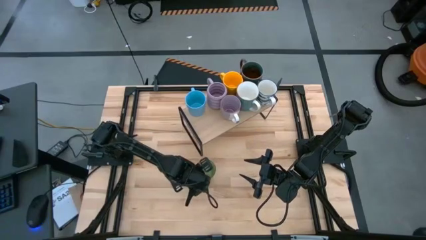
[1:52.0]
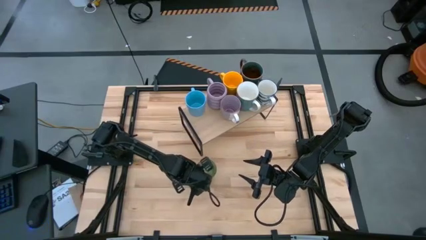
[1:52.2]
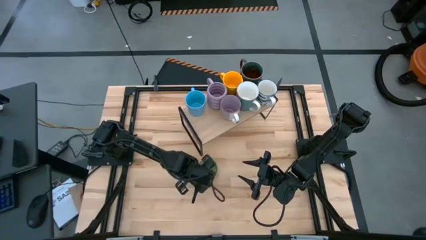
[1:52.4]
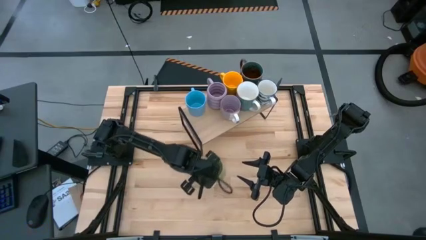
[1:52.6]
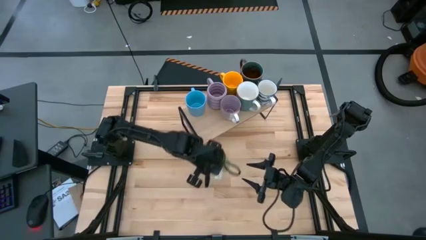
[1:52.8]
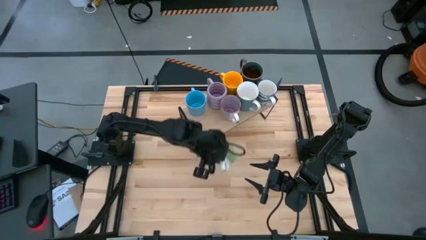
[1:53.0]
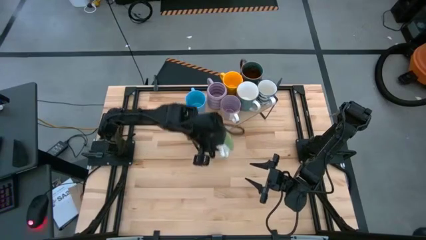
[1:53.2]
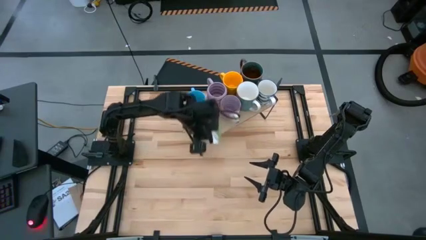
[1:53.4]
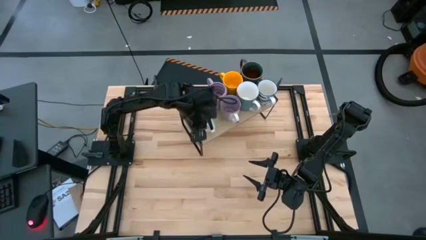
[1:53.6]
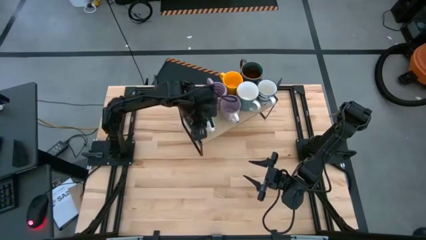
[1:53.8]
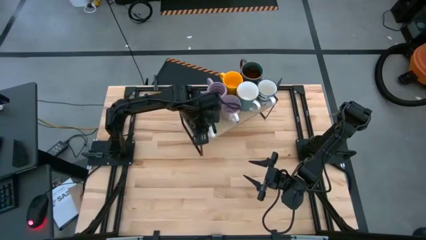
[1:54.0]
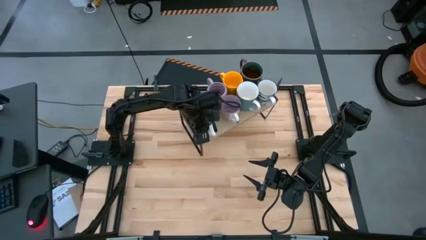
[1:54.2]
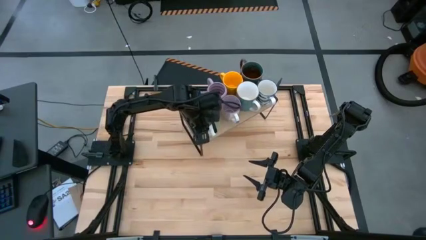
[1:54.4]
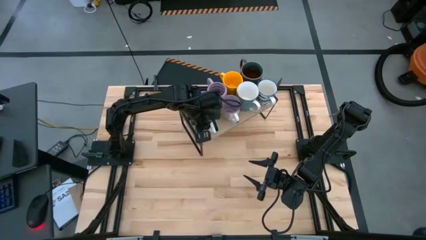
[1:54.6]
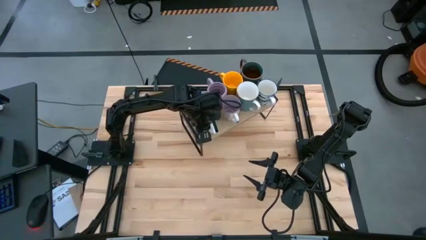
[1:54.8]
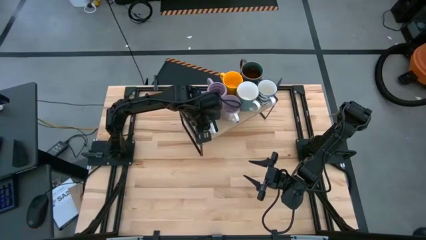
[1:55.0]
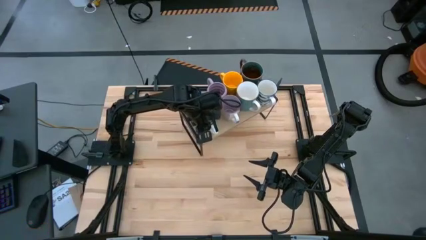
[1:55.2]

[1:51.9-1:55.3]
Task: Place coffee mugs
Put the green mug on the shelf

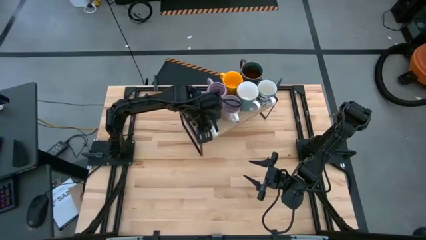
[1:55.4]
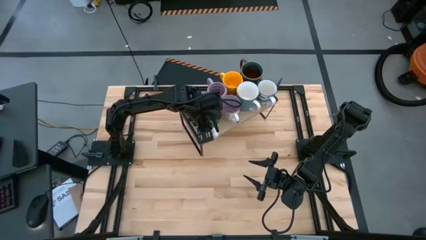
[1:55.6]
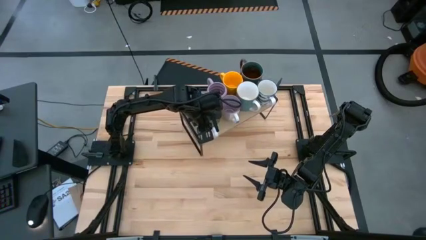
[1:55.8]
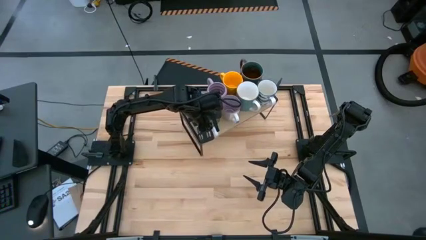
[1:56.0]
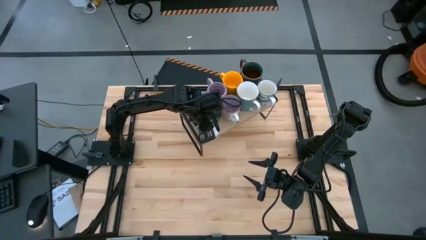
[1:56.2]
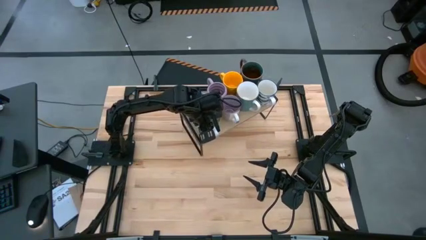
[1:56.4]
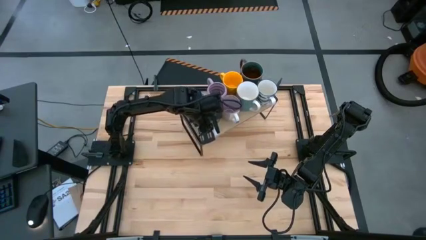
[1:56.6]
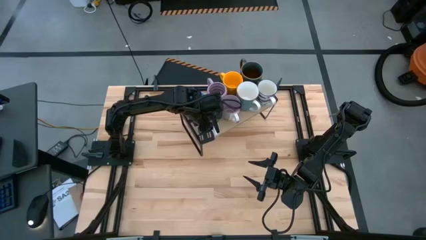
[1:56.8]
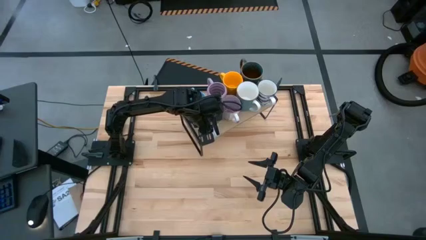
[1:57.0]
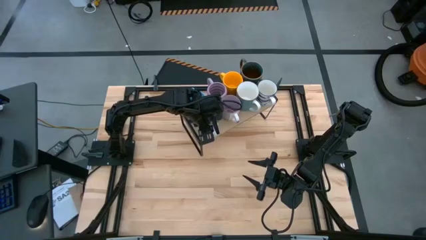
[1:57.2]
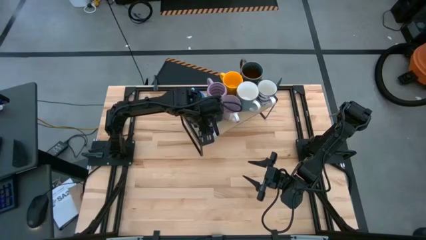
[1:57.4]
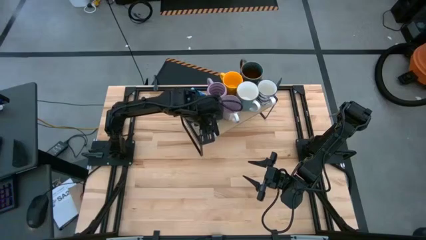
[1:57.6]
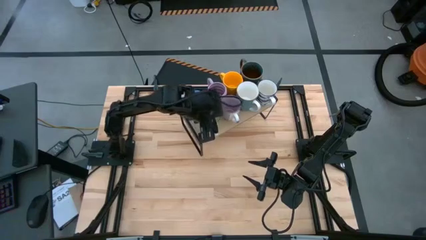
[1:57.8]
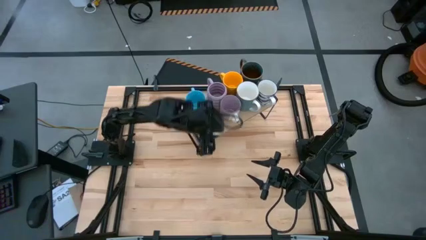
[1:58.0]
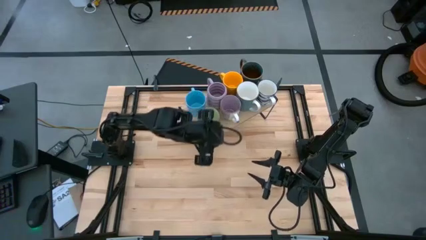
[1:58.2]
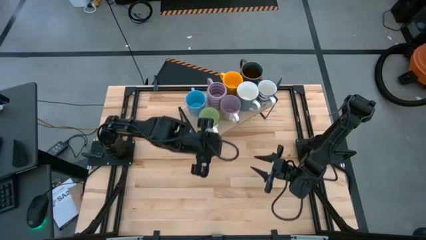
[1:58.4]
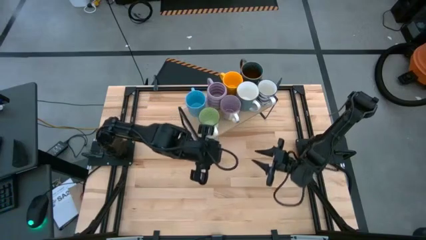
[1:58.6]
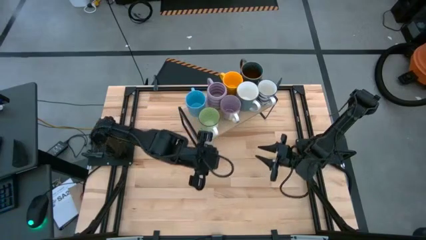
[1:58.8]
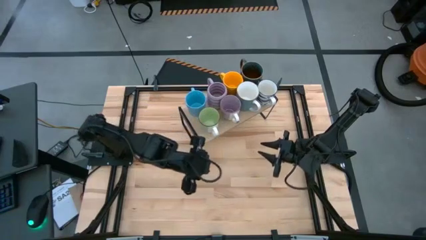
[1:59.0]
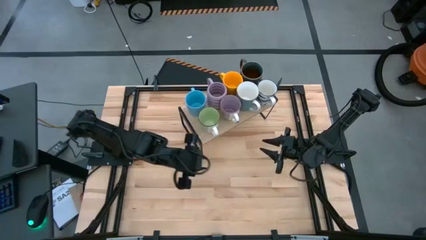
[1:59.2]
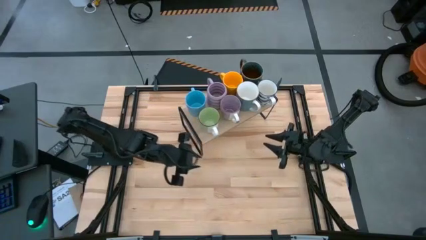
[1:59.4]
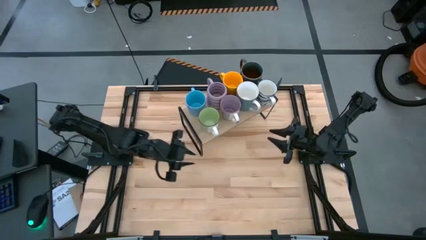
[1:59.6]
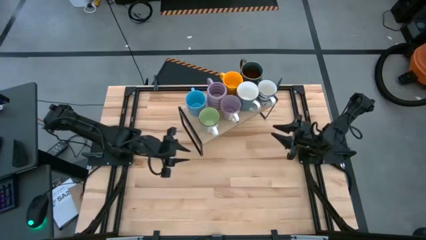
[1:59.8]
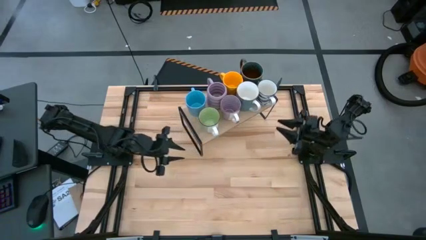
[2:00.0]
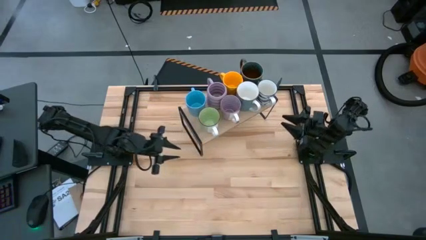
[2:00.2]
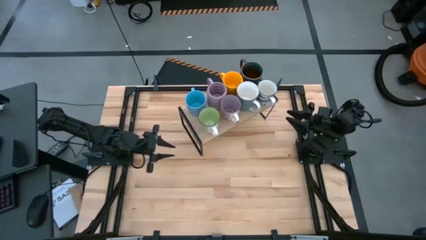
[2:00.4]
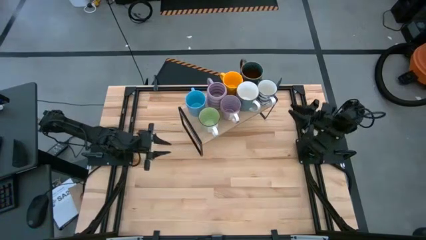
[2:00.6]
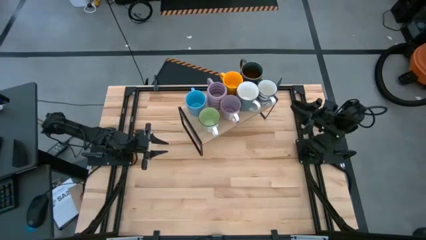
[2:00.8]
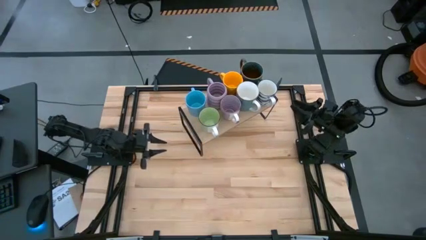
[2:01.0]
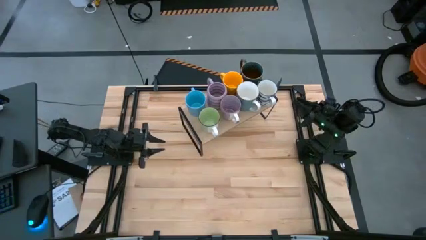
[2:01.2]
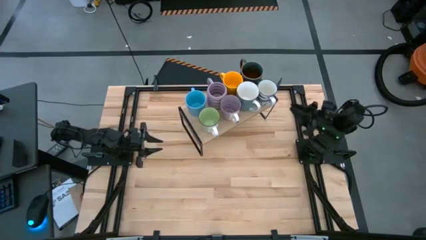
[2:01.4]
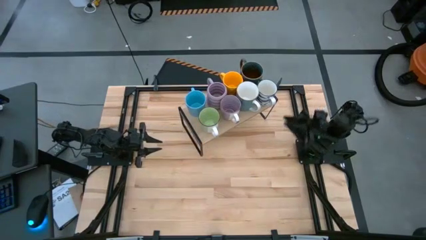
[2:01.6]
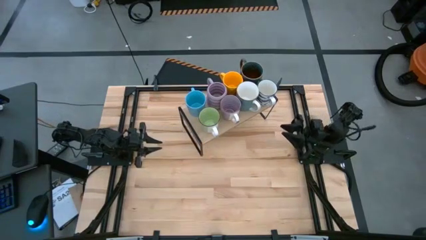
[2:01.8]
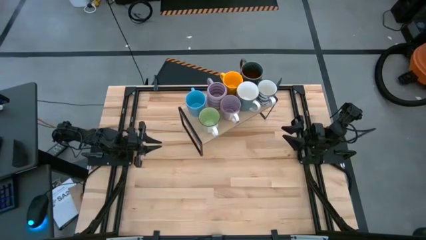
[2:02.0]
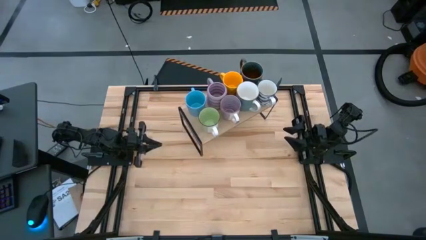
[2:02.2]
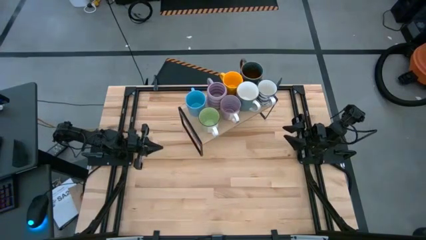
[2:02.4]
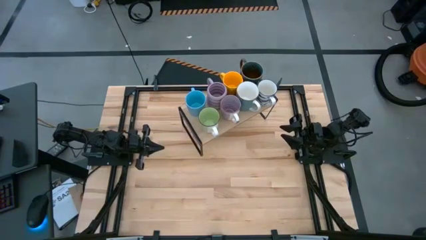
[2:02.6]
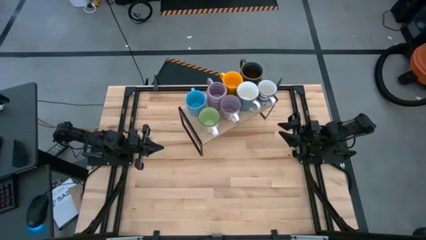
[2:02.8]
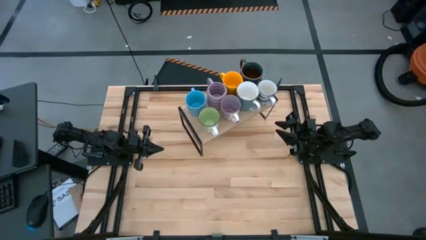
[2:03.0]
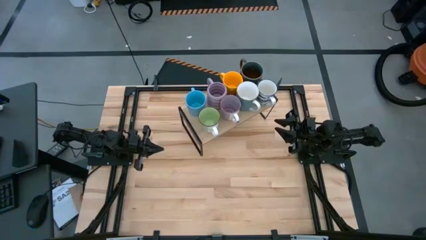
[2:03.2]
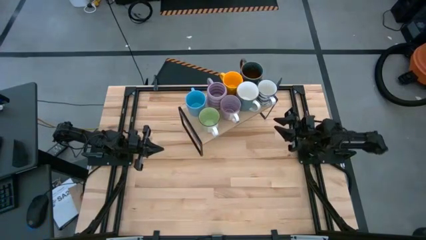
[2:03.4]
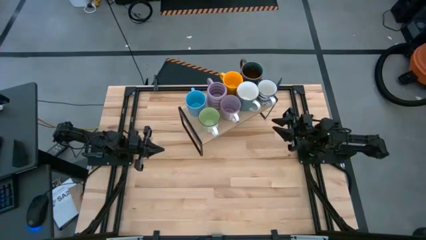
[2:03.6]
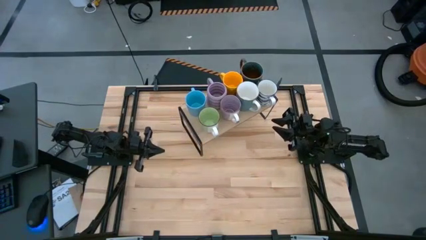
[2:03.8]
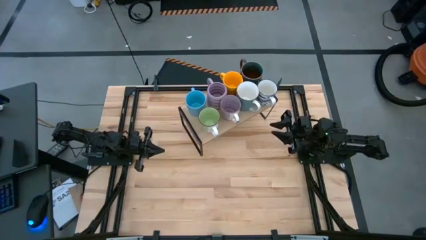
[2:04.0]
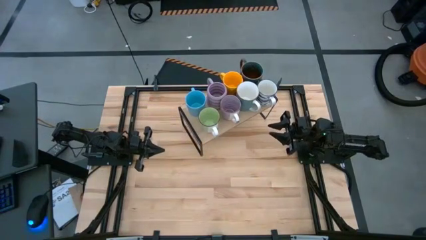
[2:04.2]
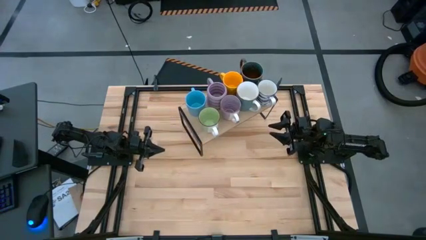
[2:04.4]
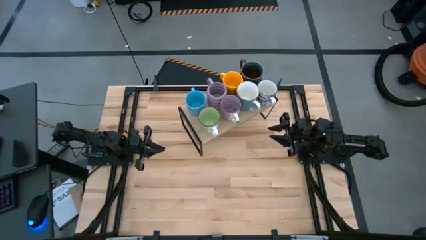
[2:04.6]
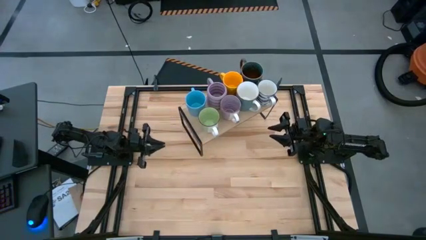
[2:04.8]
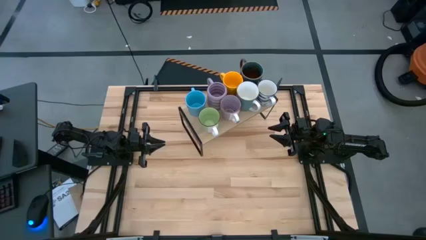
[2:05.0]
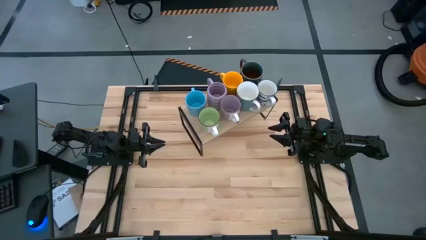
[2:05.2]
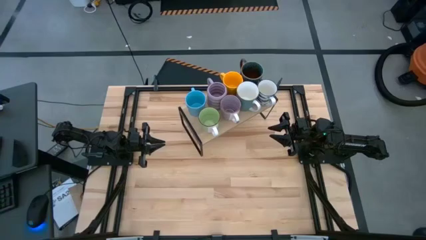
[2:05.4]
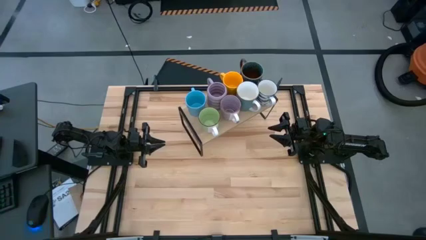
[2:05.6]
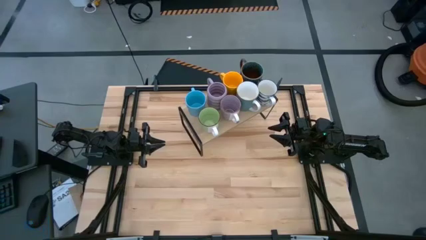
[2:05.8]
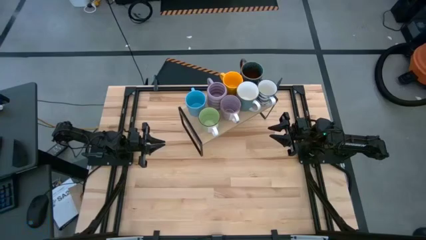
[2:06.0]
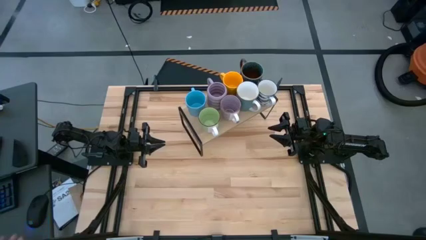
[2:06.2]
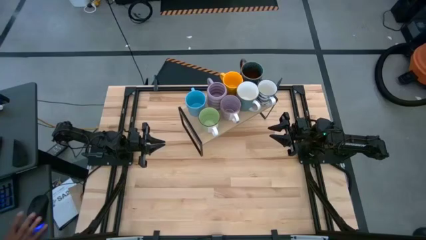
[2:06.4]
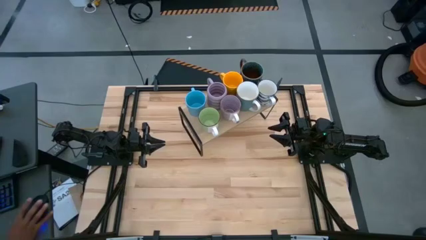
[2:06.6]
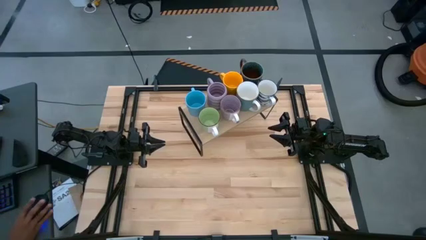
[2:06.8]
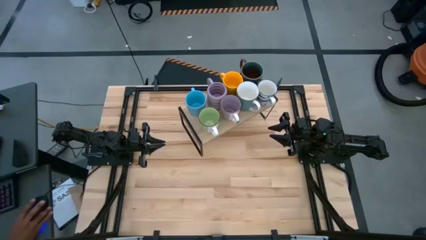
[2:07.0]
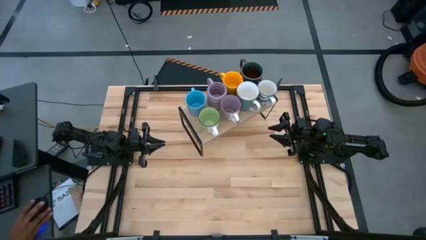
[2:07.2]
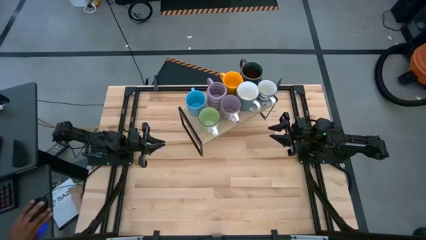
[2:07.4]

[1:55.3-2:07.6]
Return to Home Position
